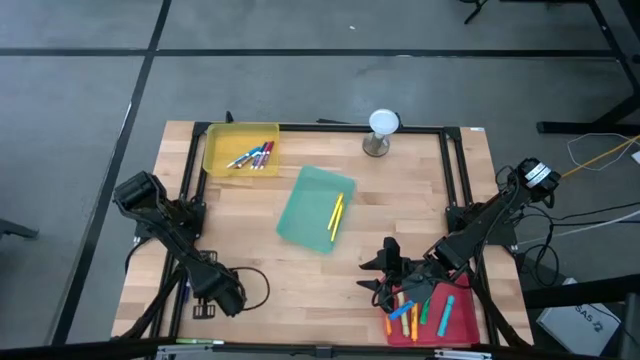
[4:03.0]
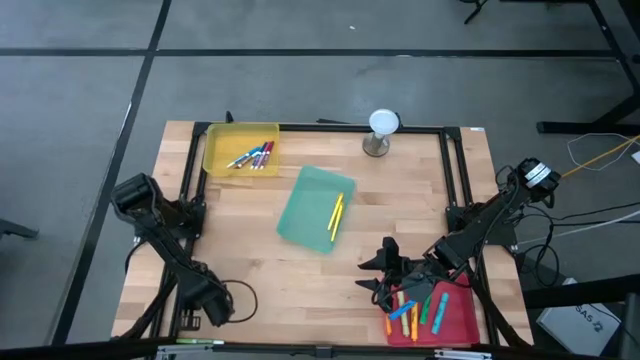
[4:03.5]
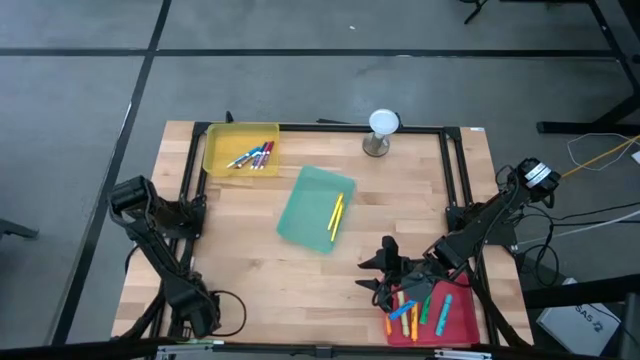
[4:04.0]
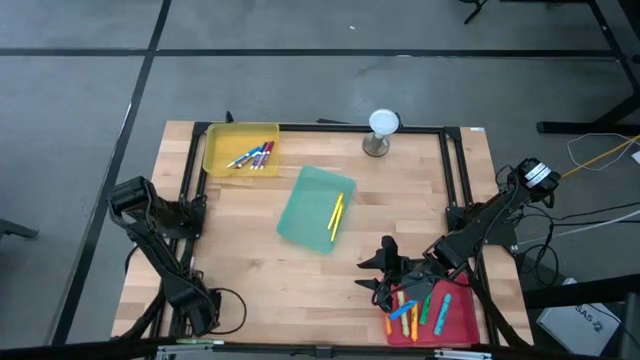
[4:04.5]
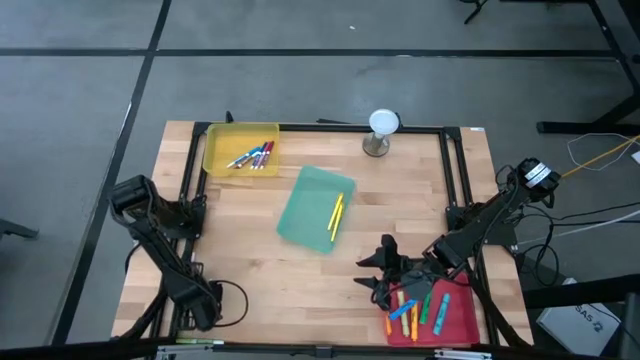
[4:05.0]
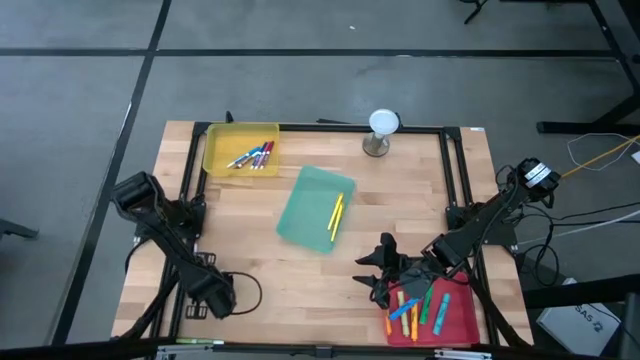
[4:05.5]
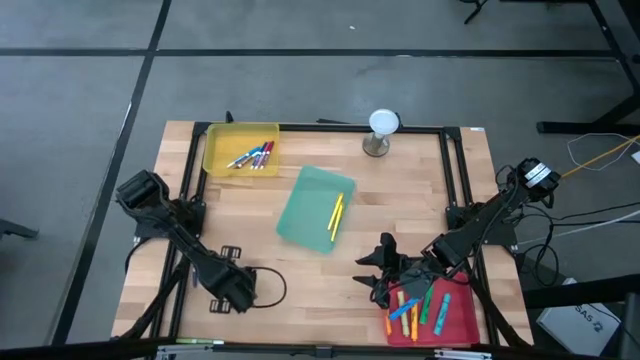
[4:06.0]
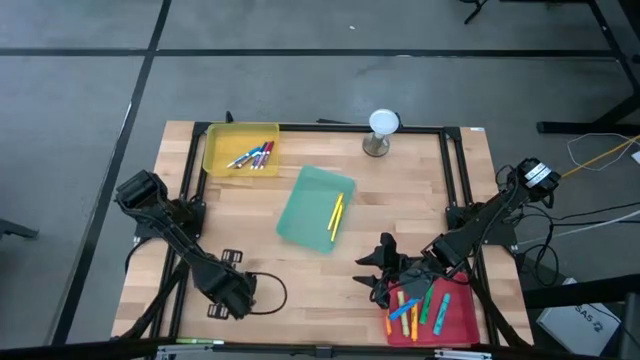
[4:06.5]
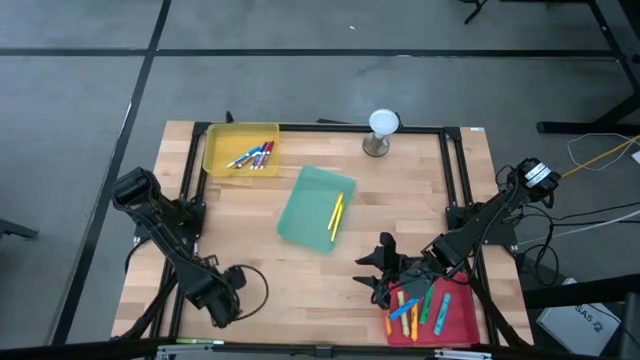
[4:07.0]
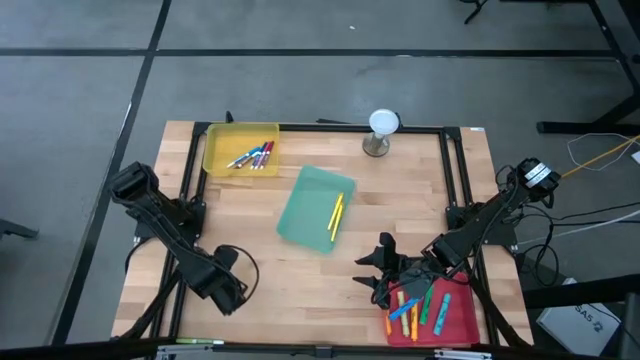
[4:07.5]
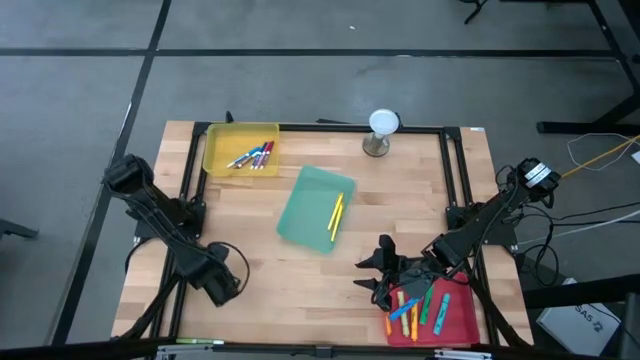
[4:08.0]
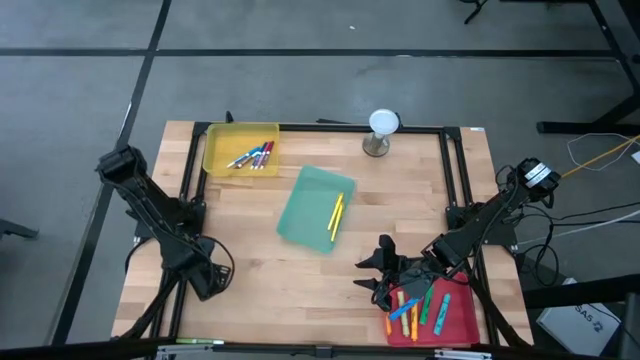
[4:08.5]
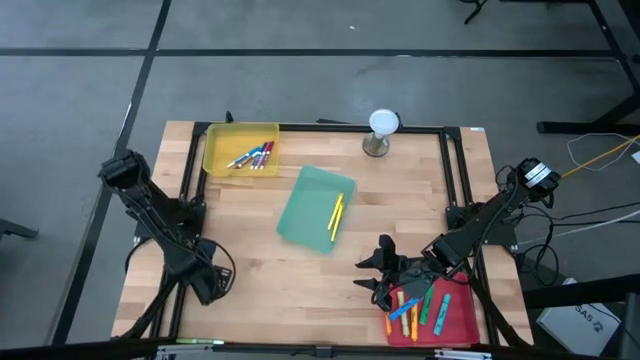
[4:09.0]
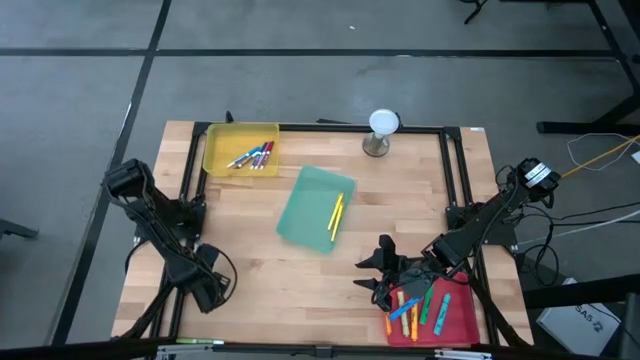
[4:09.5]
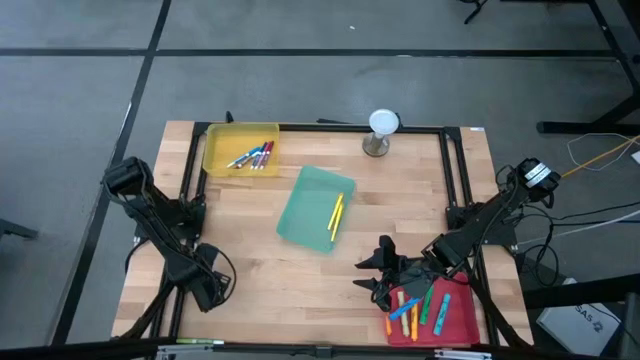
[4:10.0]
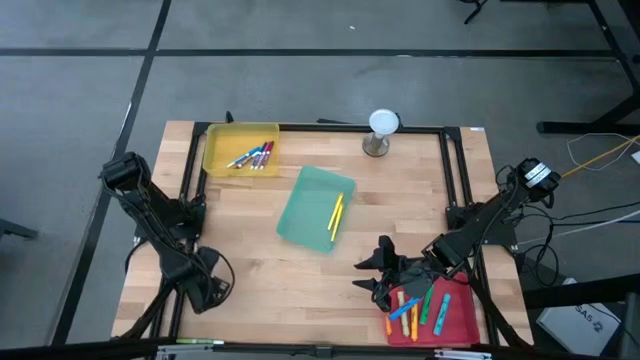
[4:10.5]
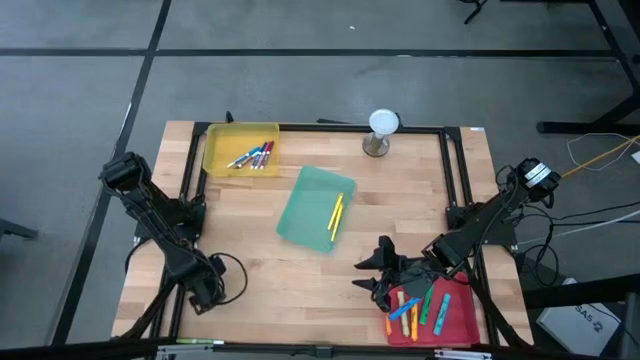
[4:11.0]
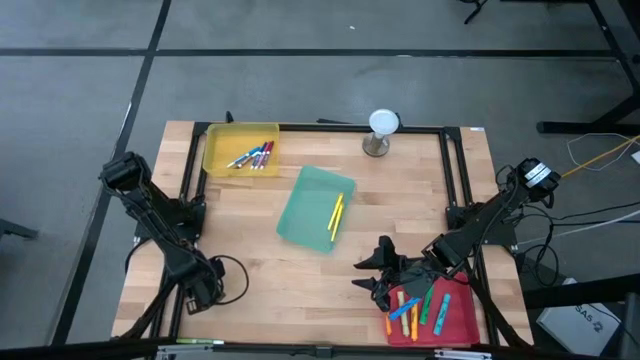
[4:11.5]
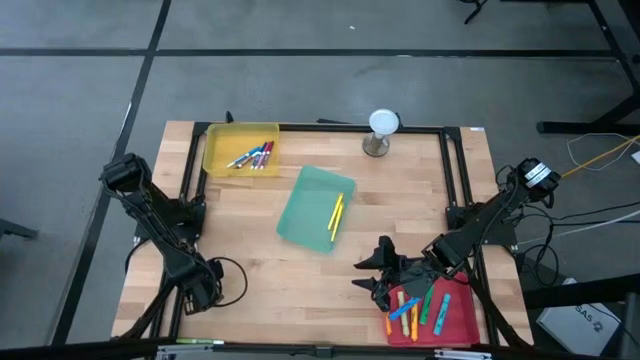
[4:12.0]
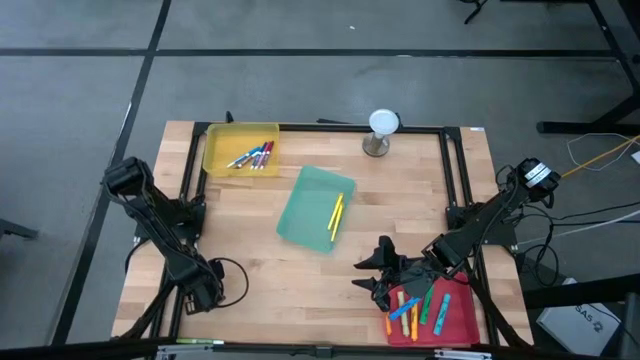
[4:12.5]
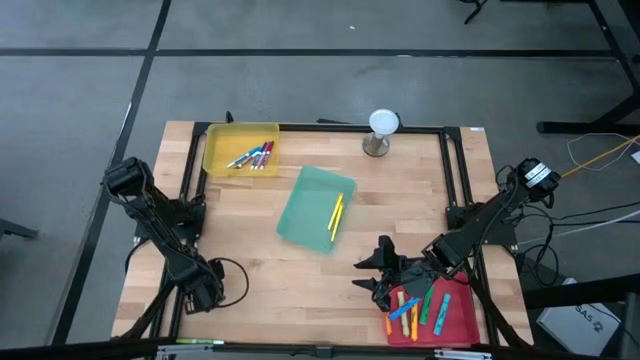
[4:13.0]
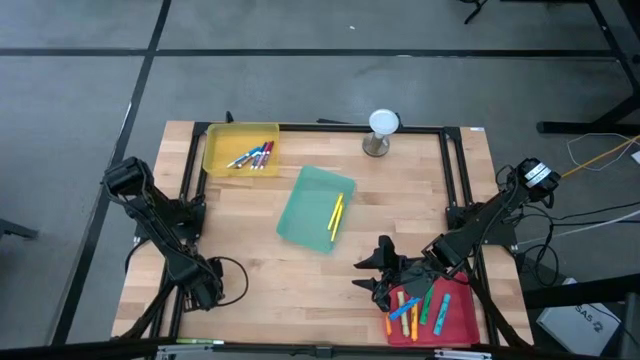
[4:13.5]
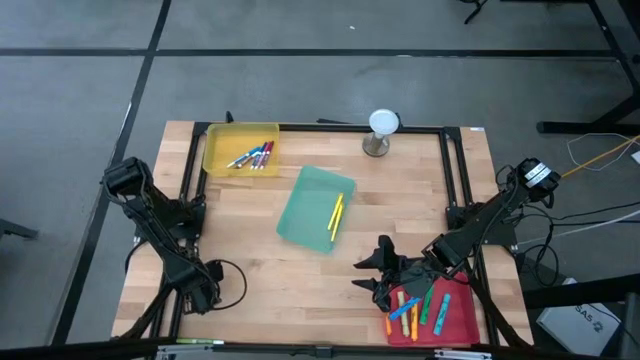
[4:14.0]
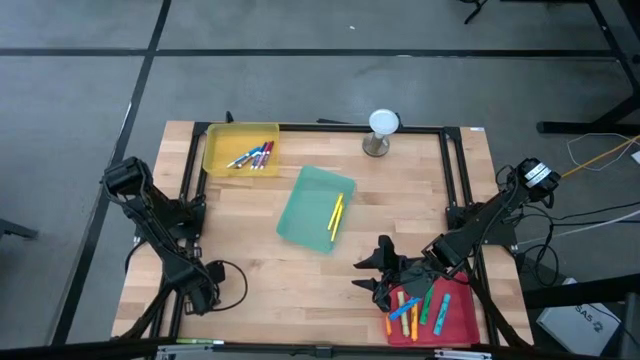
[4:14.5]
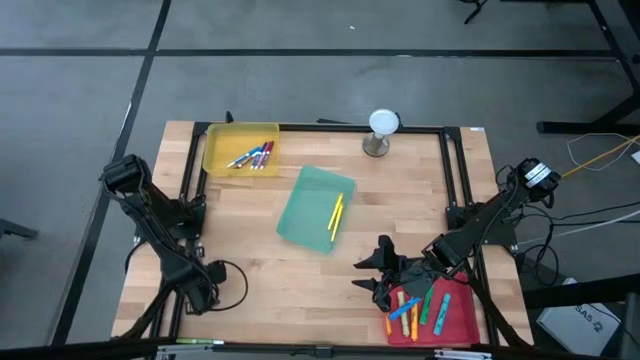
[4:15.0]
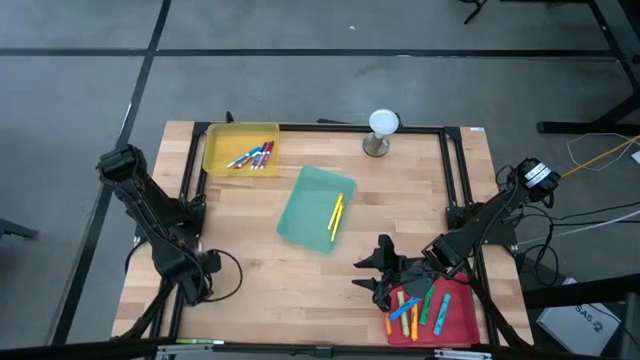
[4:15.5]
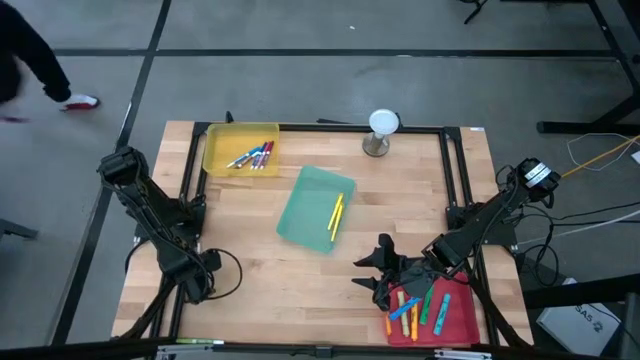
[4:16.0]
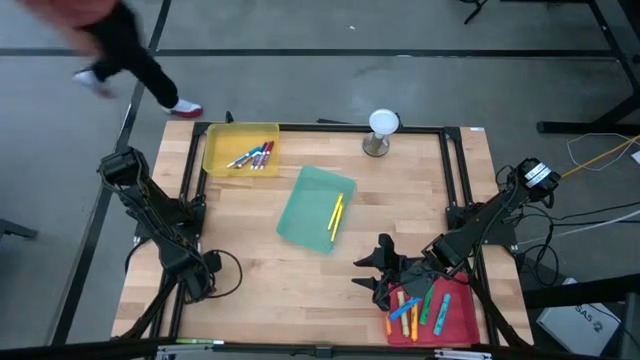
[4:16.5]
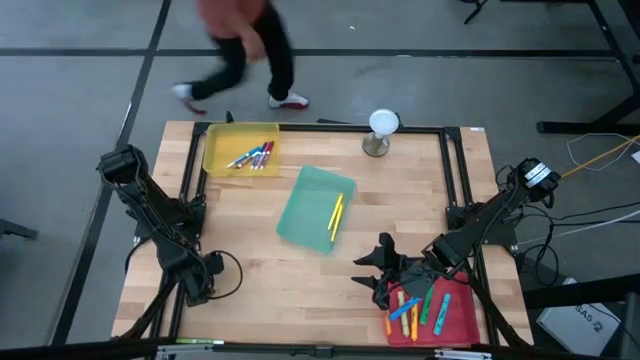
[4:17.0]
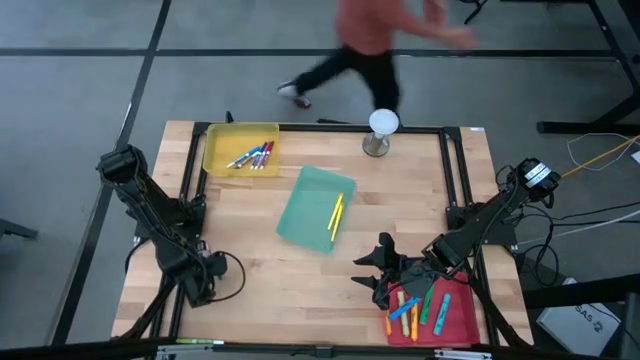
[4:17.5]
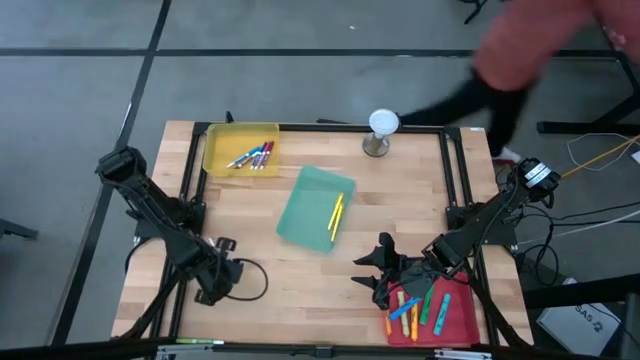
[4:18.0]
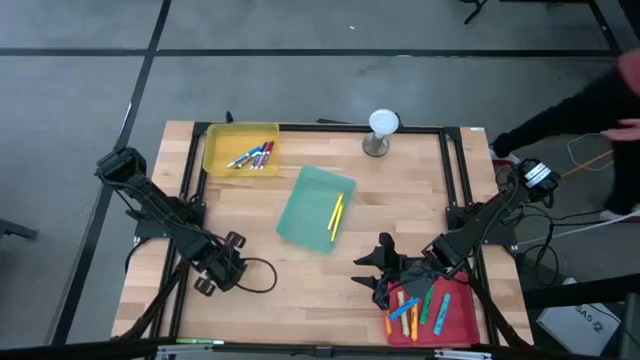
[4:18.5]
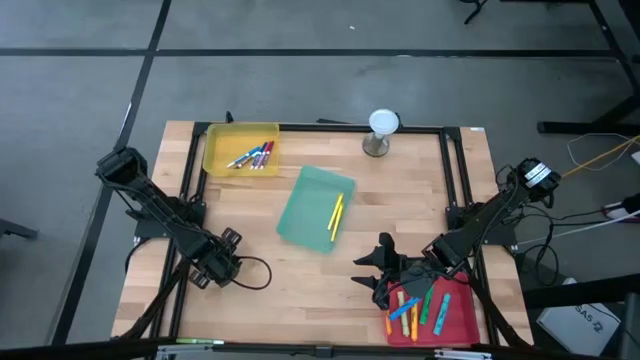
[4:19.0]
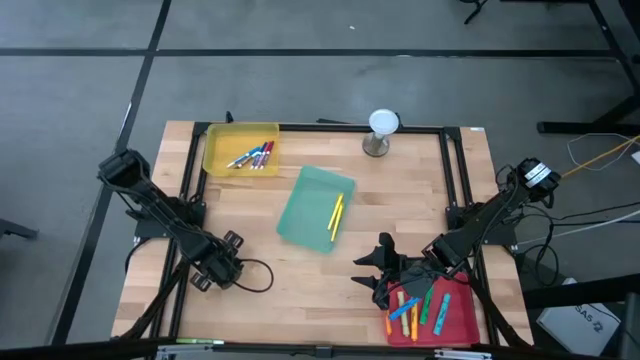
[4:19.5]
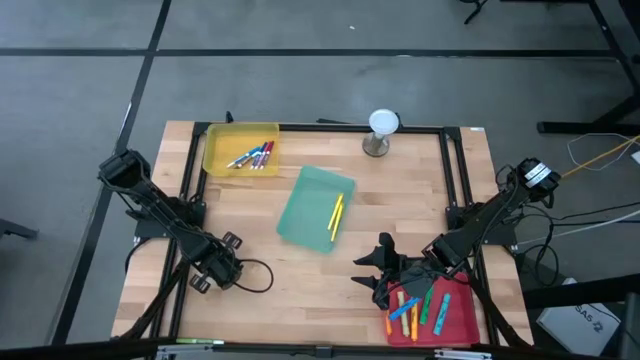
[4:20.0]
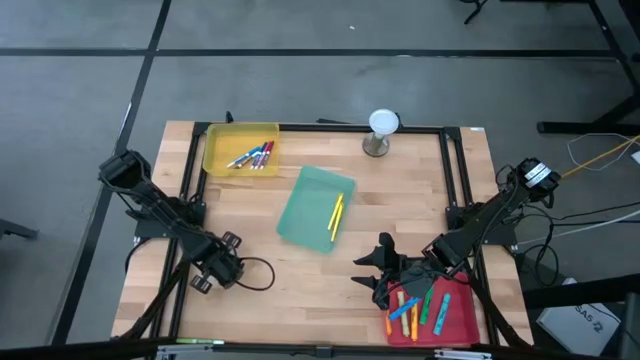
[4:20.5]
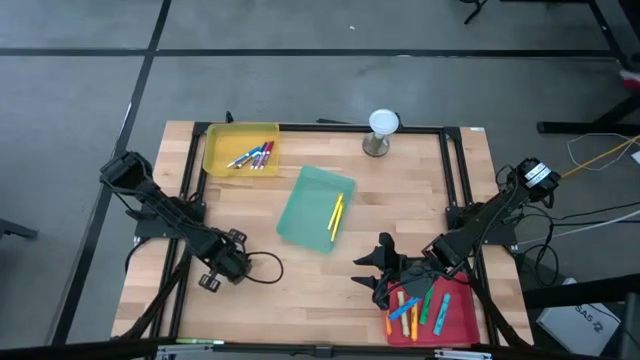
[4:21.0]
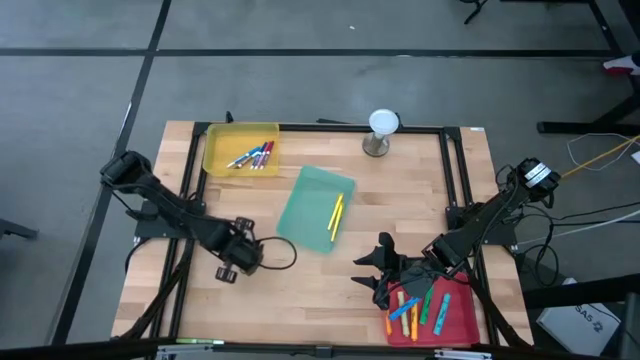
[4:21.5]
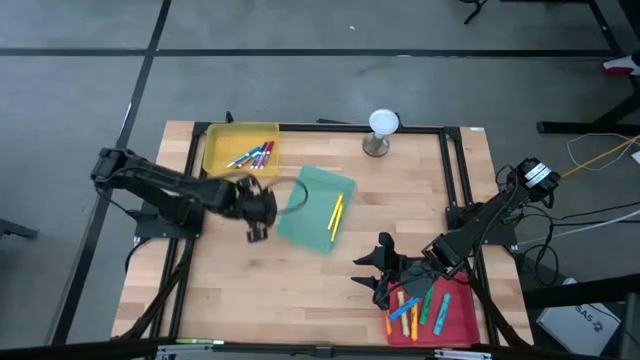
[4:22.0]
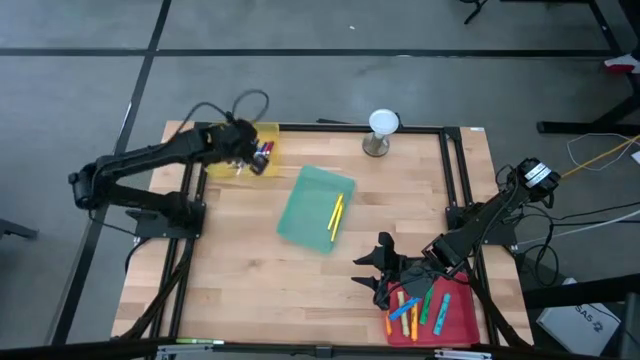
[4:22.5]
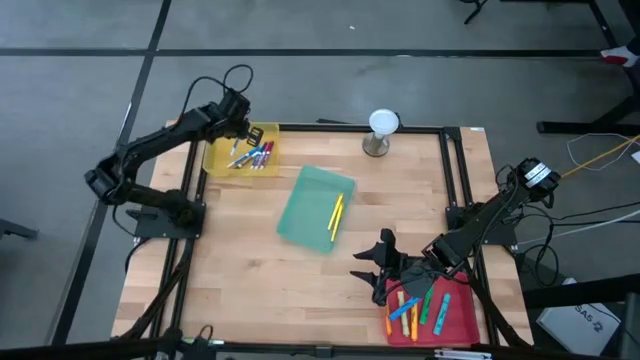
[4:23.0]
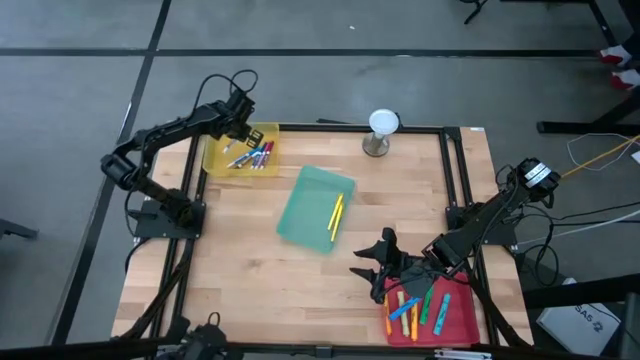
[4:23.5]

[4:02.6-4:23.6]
Task: Pick & Place Markers
Put the blue marker pen into the yellow bin
